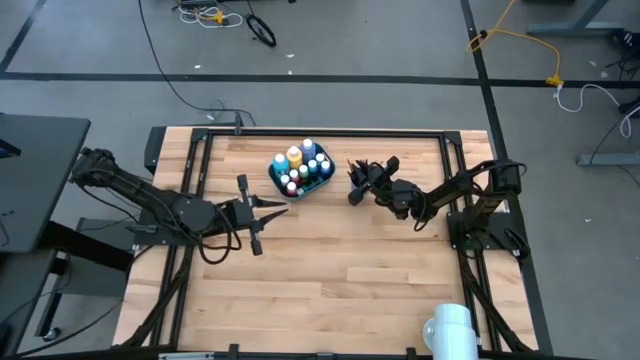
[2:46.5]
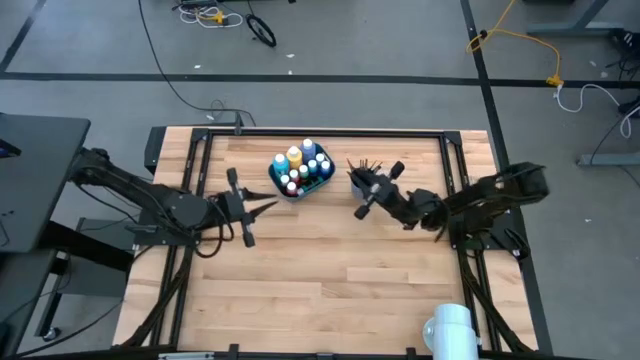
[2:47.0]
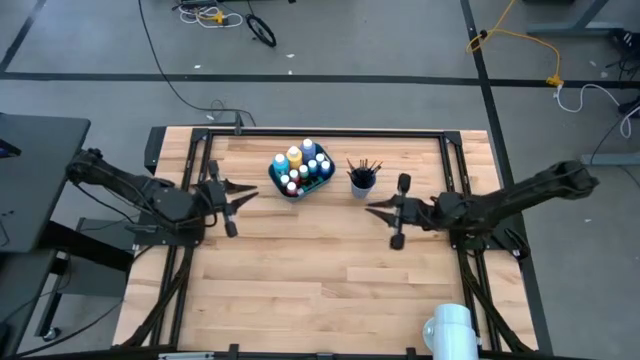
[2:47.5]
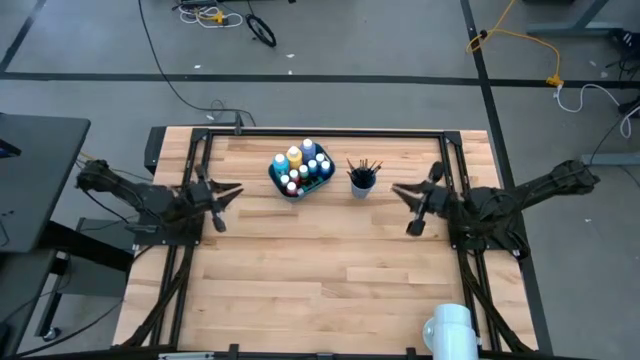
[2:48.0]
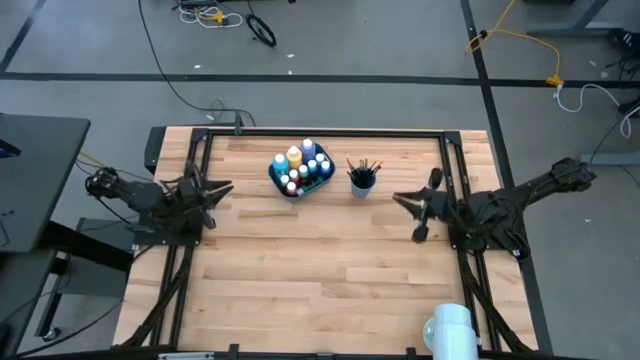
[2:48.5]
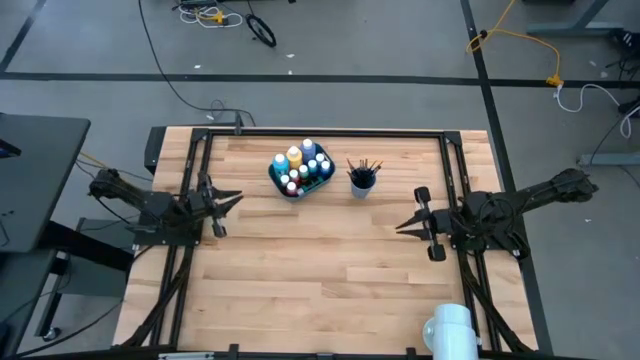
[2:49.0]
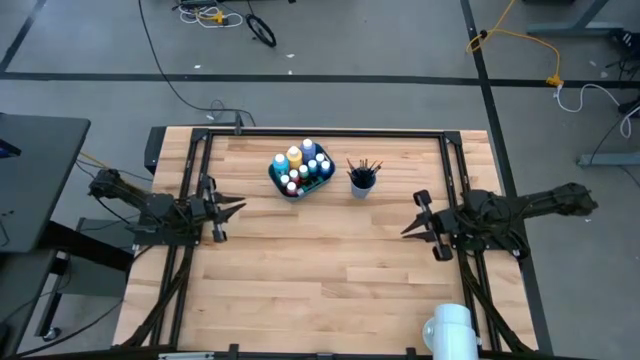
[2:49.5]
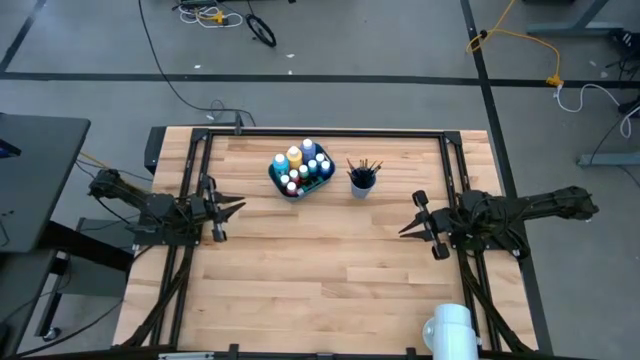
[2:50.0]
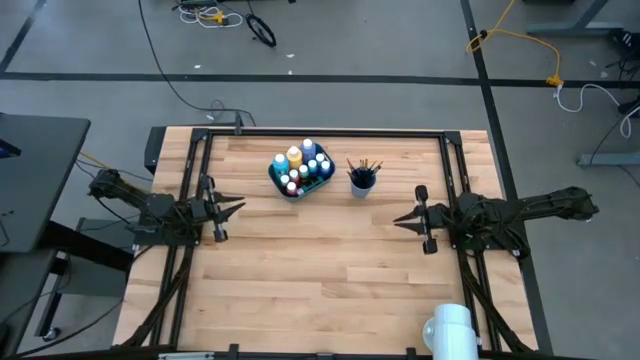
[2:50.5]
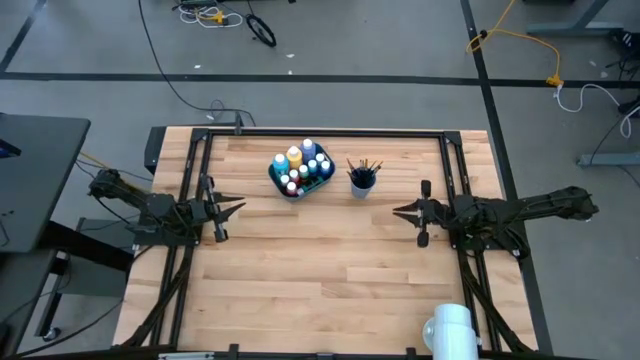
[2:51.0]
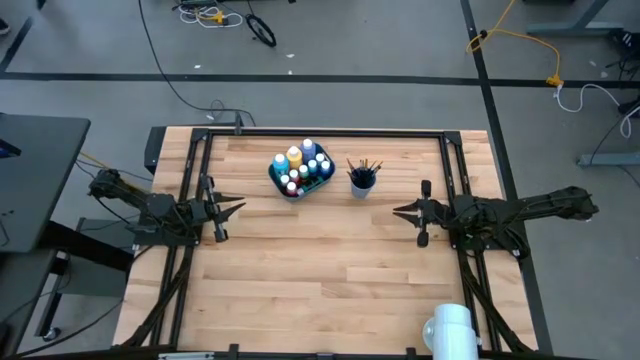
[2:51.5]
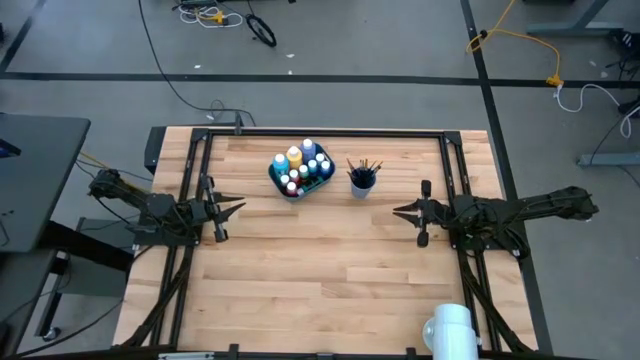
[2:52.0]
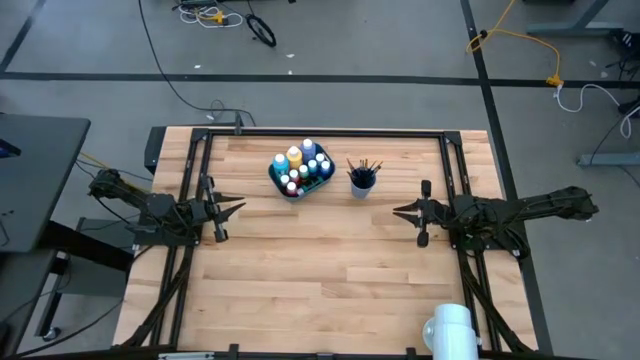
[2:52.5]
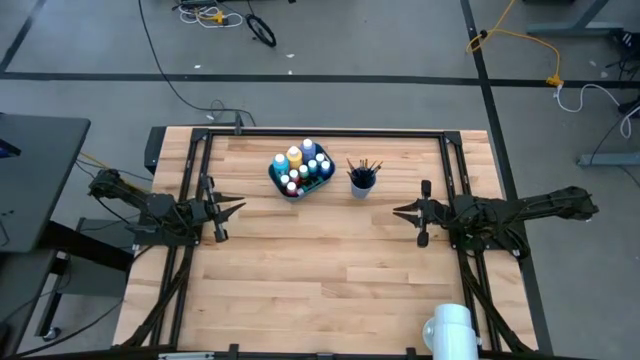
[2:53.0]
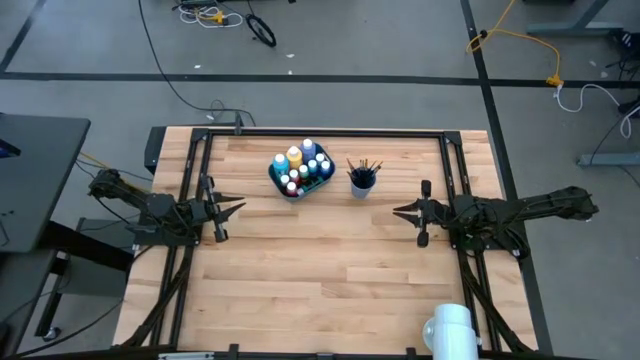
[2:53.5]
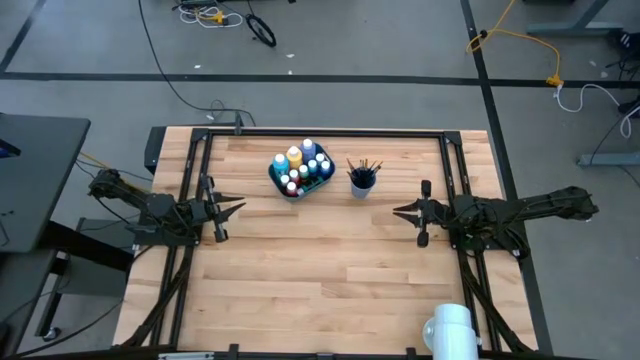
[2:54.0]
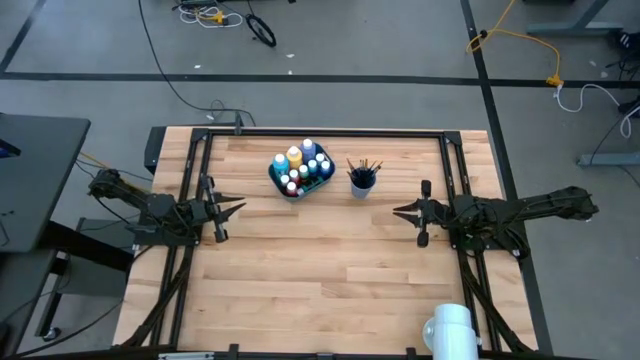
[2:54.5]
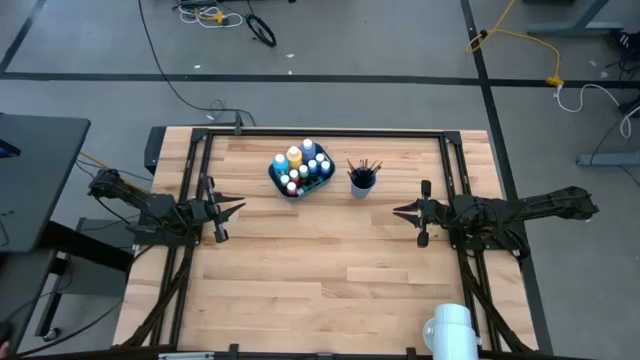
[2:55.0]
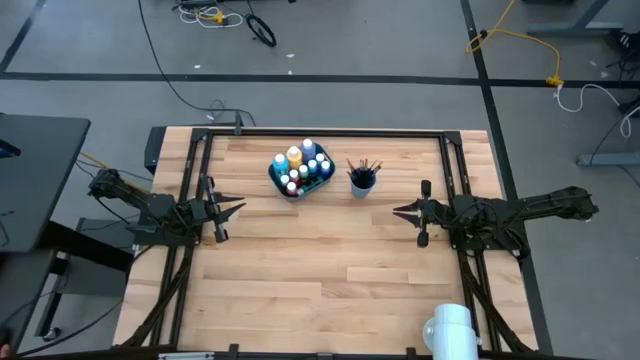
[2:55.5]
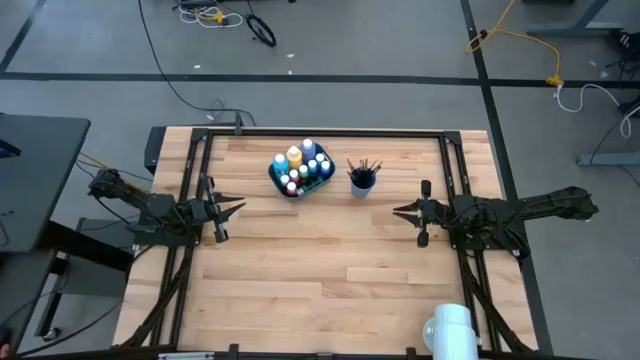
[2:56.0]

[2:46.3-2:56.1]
Task: Pick & Place Paint Supplies
Return to Home Position

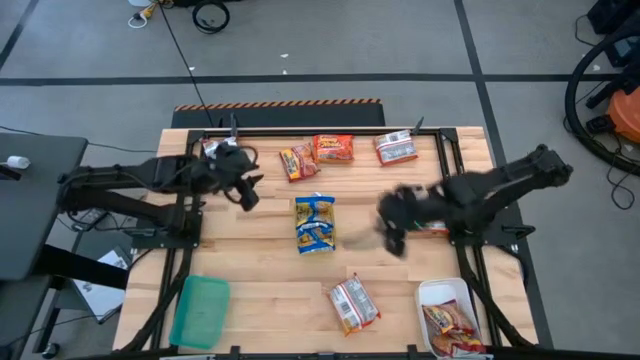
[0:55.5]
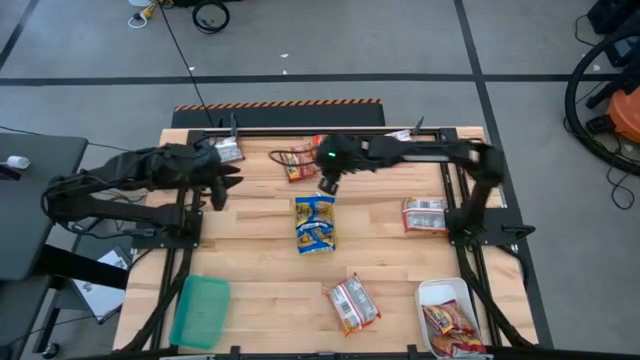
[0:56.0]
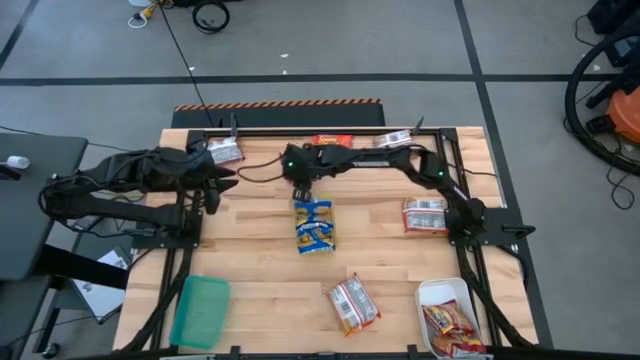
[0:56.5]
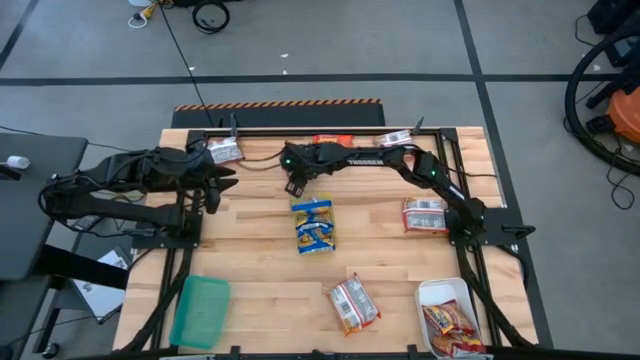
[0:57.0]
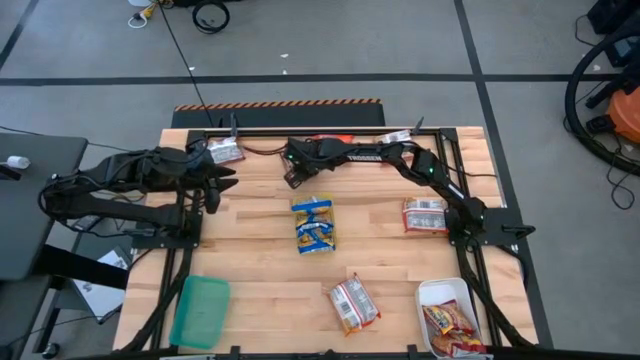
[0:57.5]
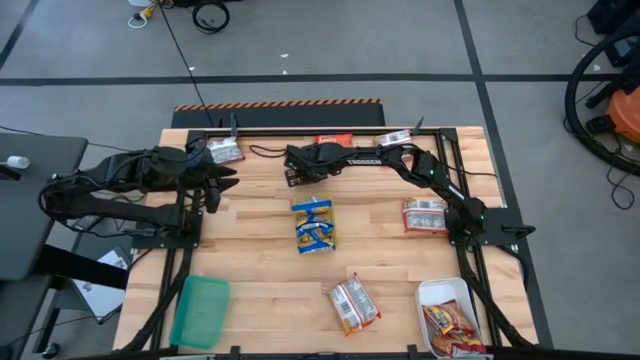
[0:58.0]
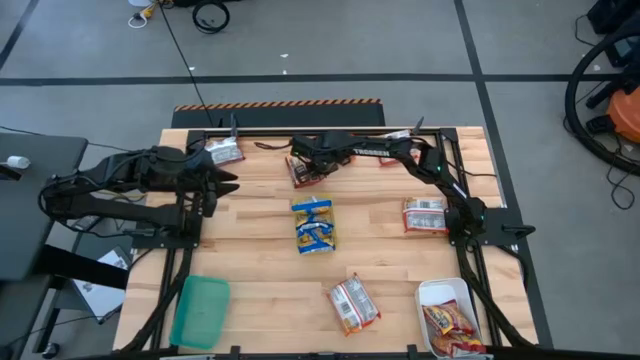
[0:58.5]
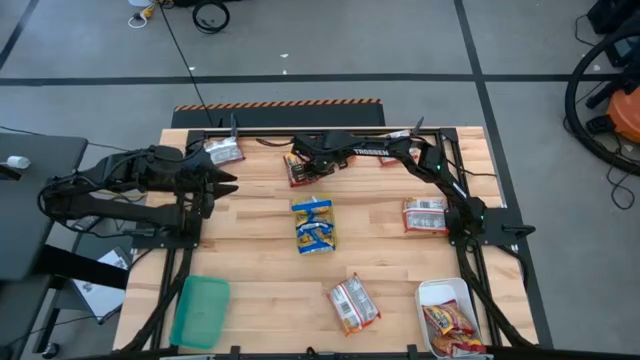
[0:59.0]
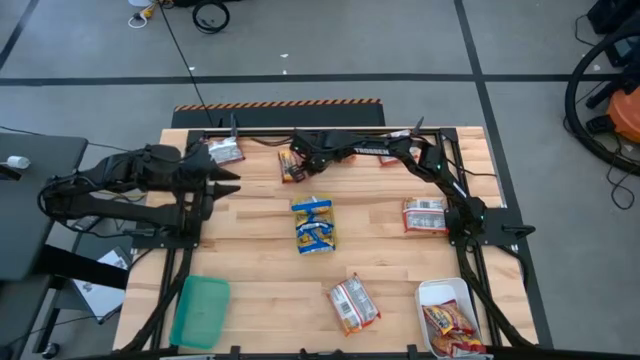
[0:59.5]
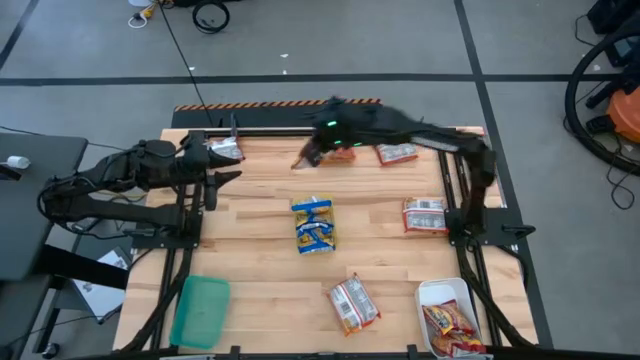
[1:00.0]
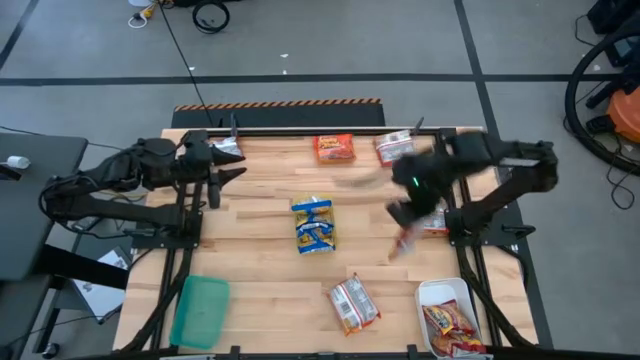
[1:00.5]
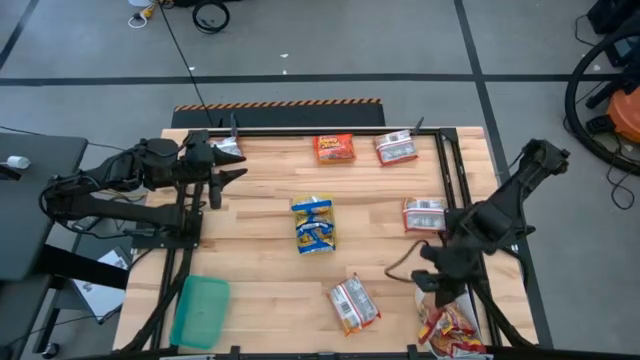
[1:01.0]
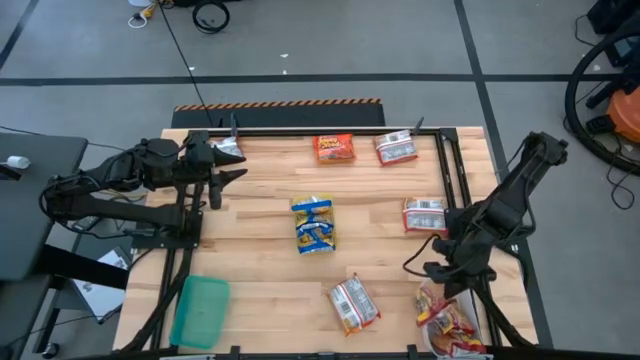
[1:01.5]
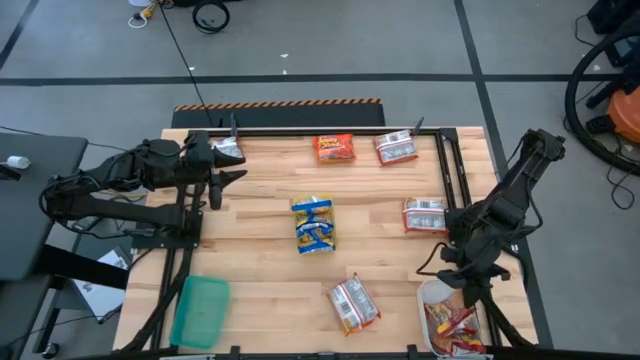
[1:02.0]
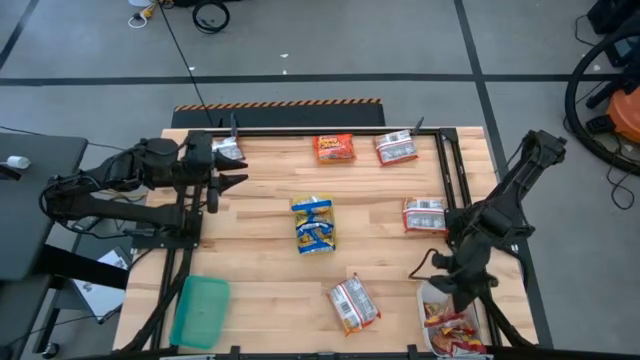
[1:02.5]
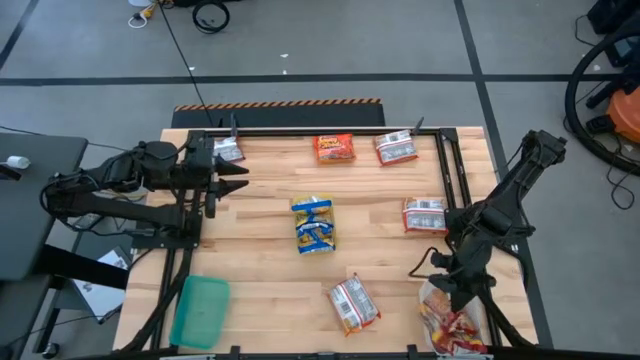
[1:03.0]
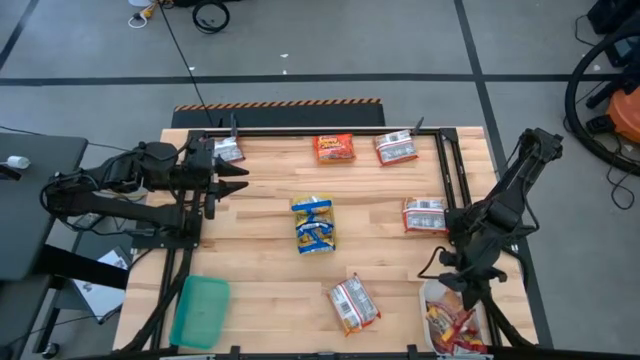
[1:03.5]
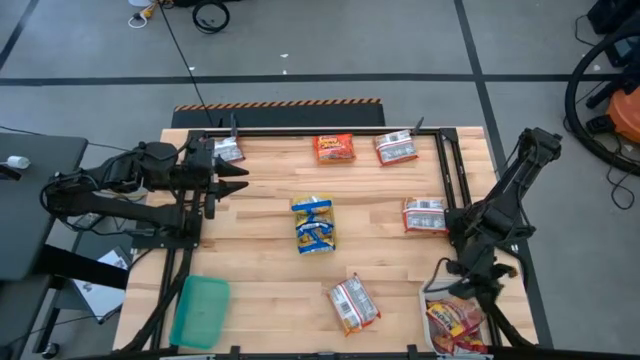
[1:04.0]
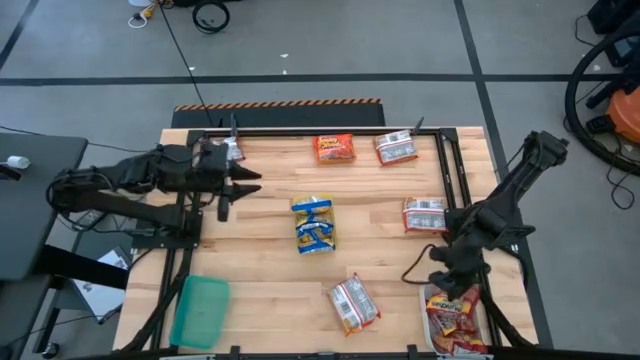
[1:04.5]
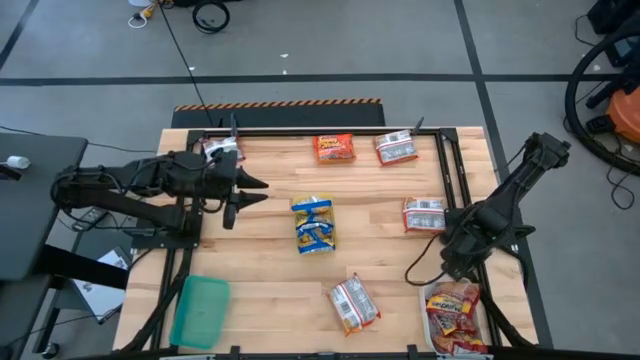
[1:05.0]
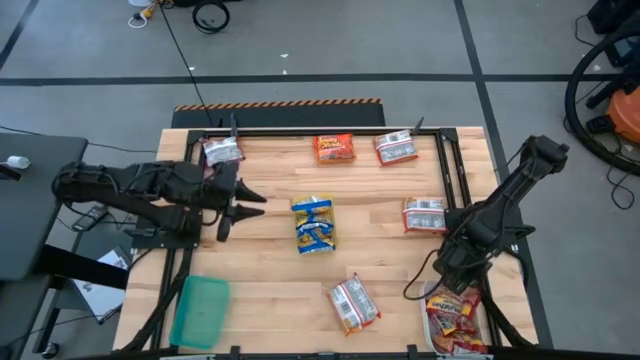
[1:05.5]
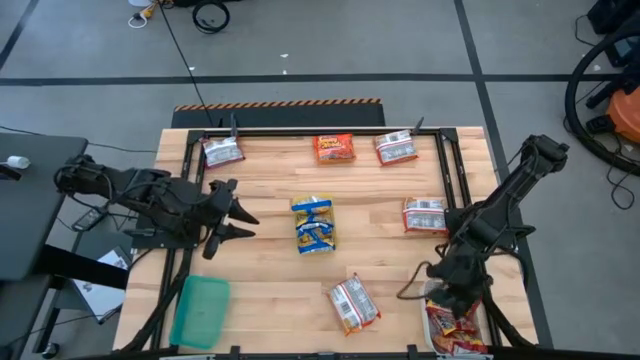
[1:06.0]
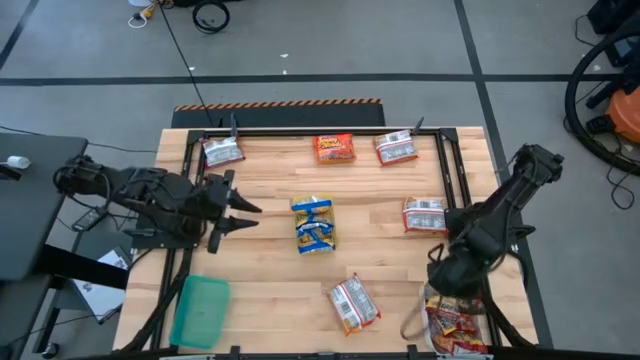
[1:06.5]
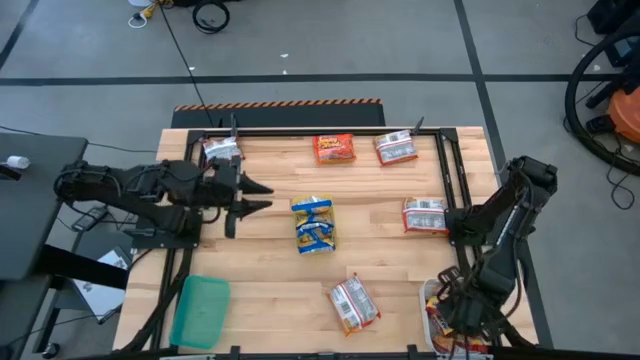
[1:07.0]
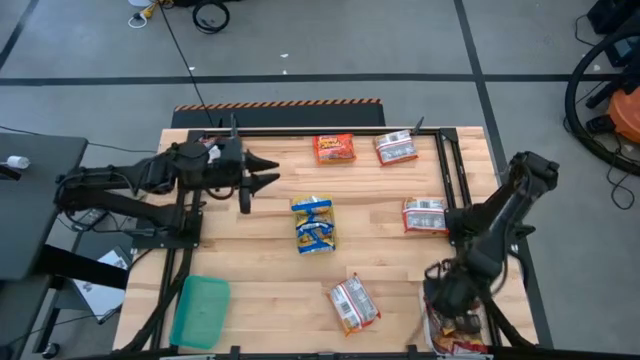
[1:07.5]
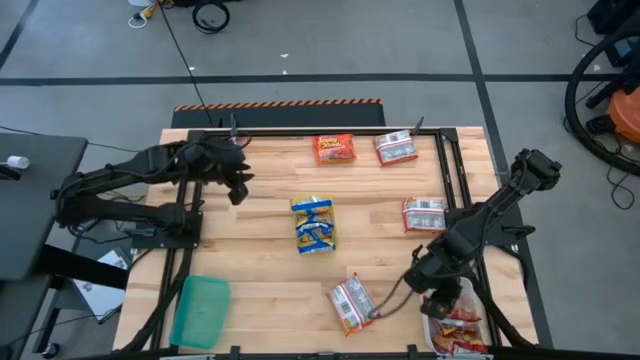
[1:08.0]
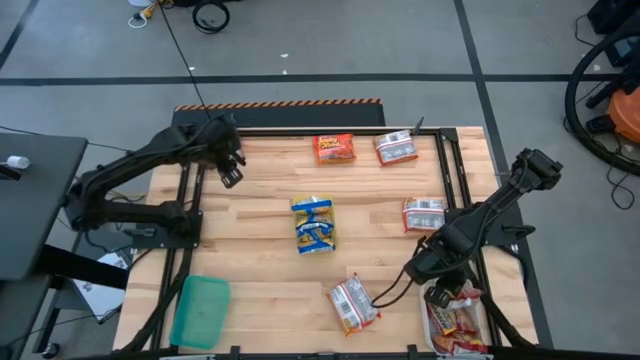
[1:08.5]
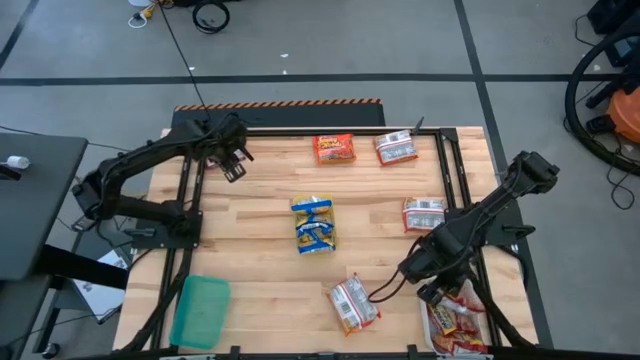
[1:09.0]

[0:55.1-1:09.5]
Task: Sort Maruchan noodles
Put the red noodle pack into the white bin
